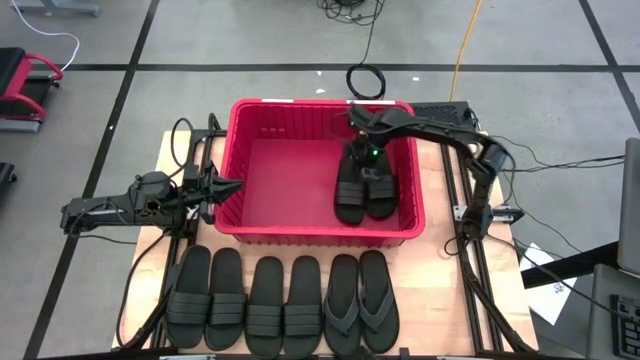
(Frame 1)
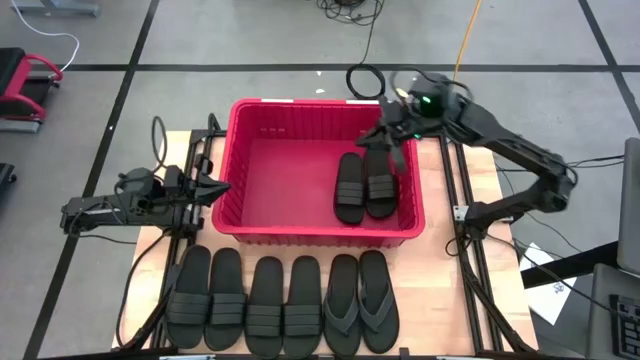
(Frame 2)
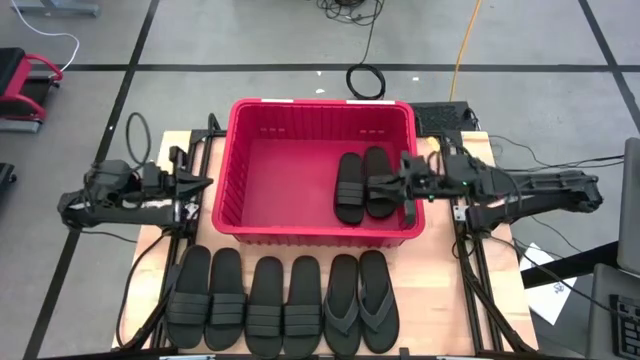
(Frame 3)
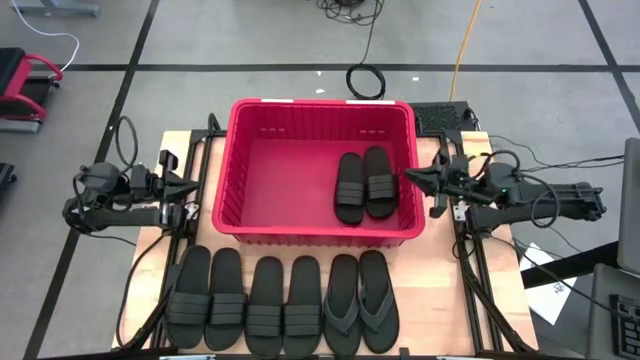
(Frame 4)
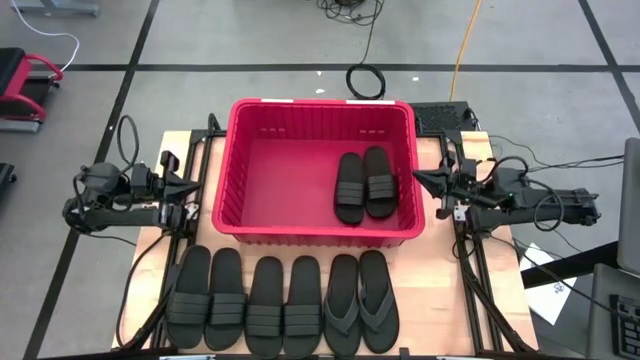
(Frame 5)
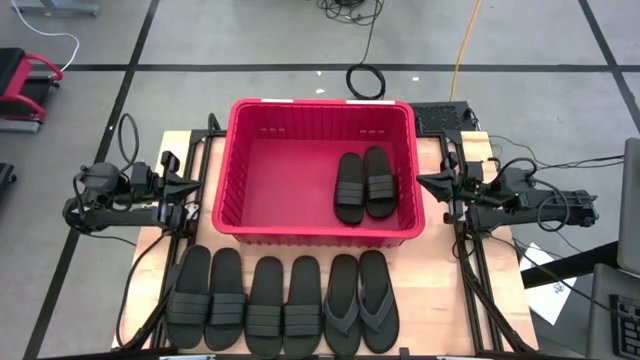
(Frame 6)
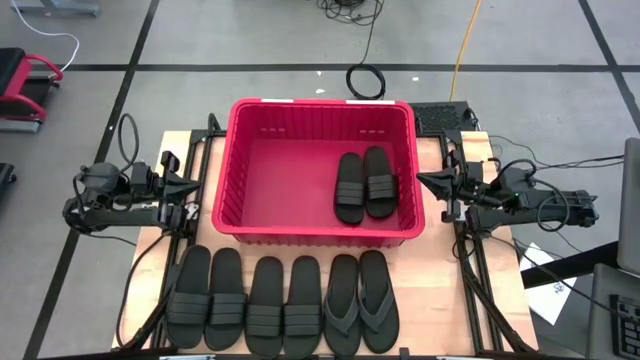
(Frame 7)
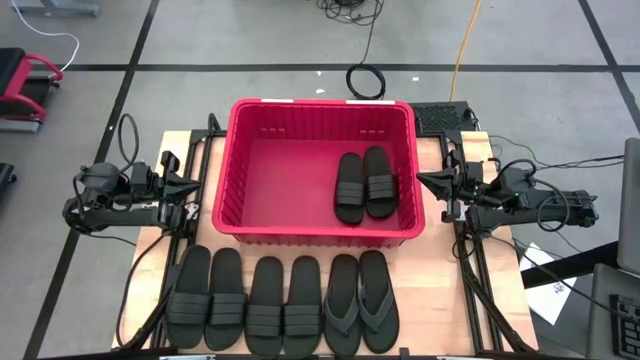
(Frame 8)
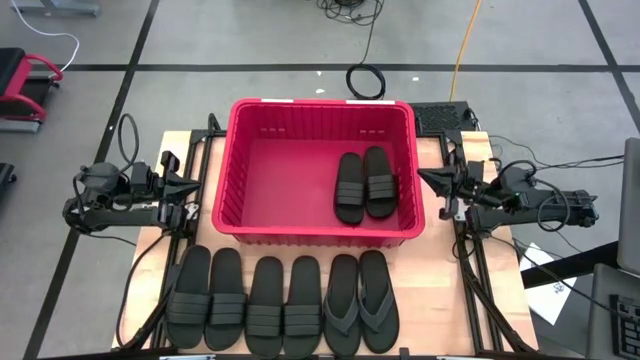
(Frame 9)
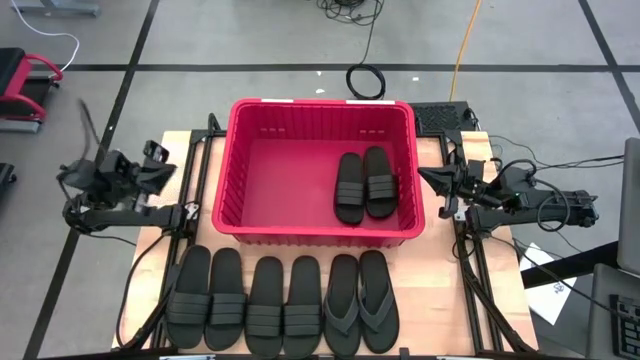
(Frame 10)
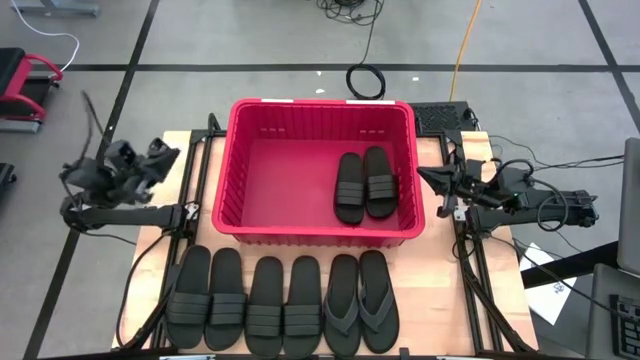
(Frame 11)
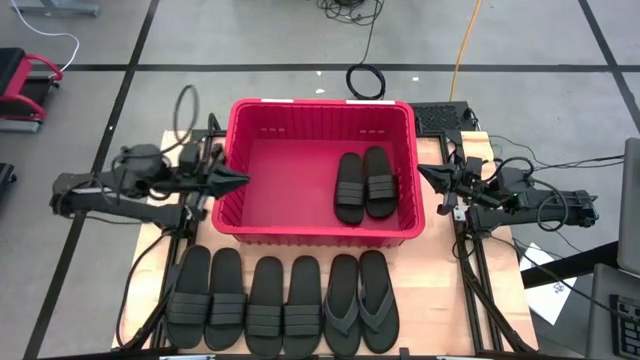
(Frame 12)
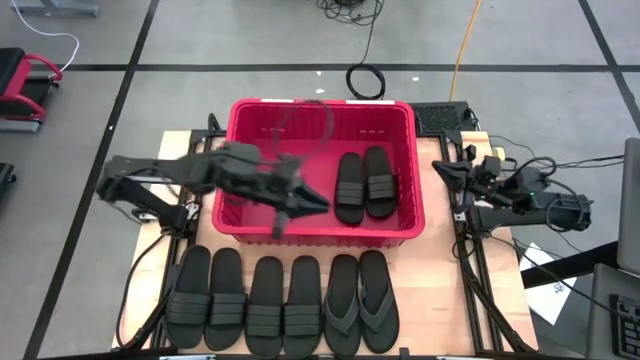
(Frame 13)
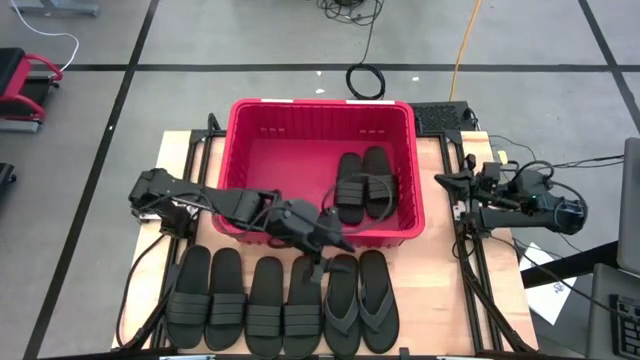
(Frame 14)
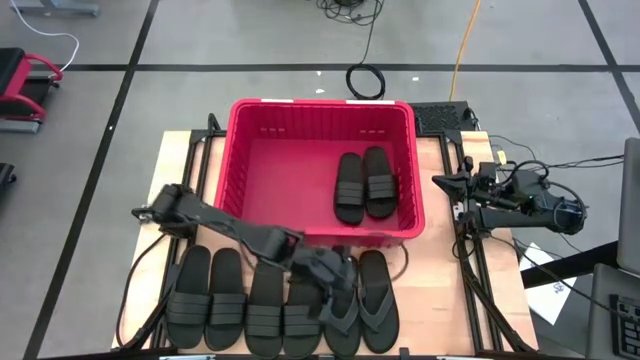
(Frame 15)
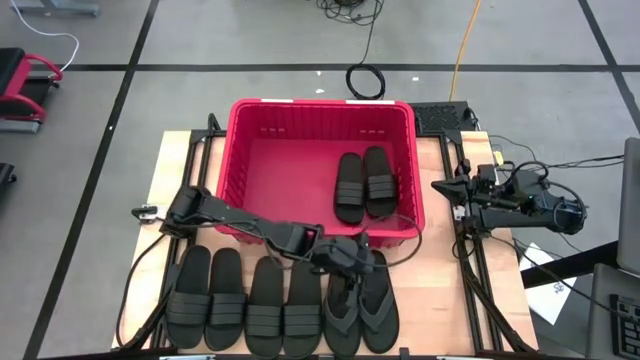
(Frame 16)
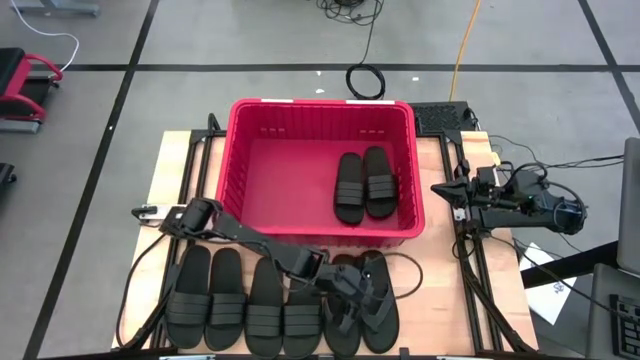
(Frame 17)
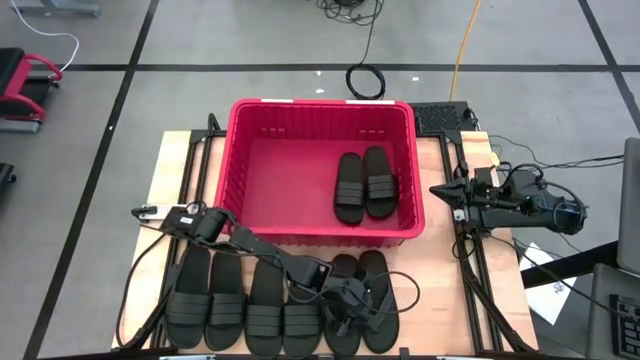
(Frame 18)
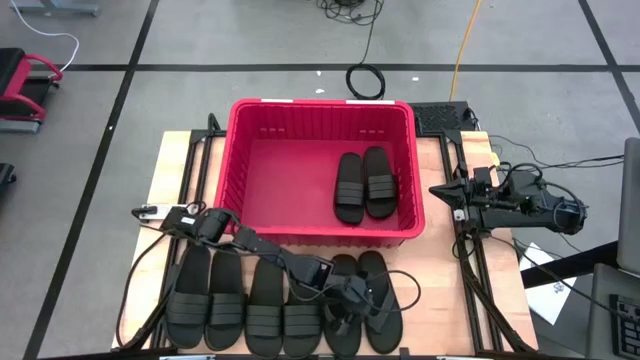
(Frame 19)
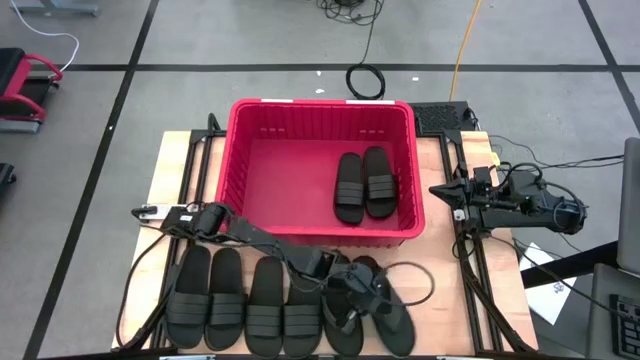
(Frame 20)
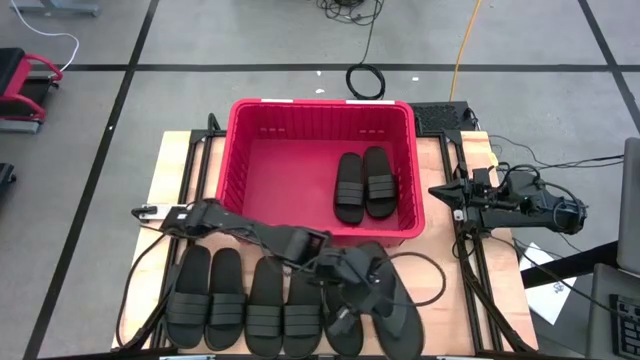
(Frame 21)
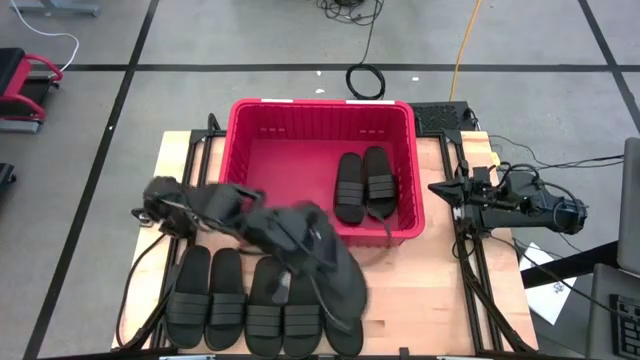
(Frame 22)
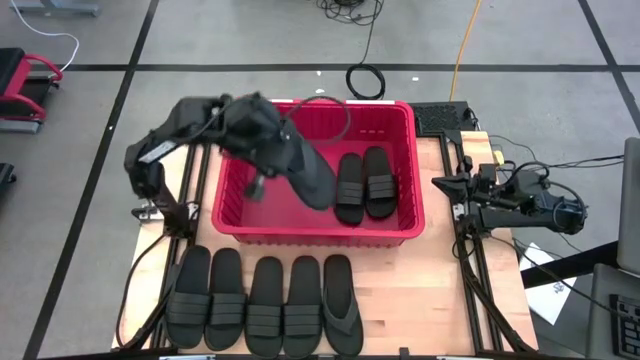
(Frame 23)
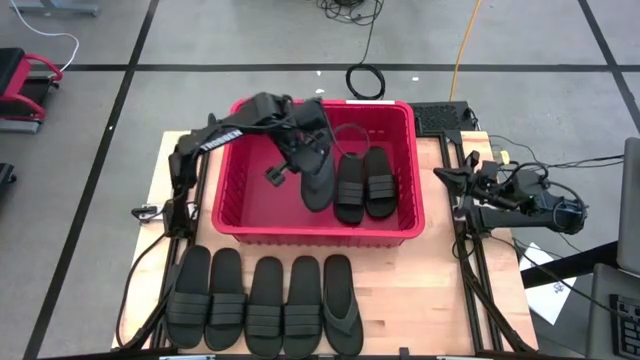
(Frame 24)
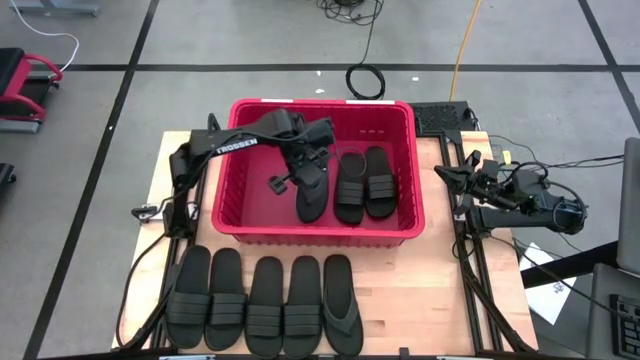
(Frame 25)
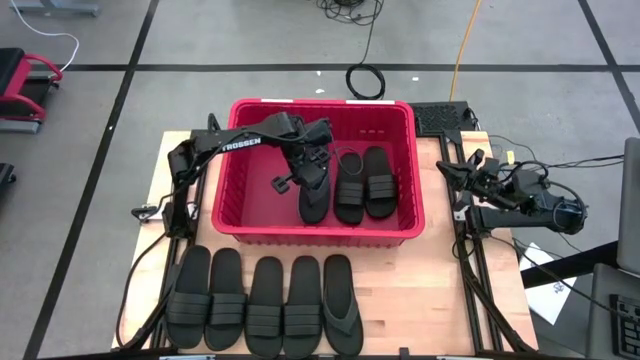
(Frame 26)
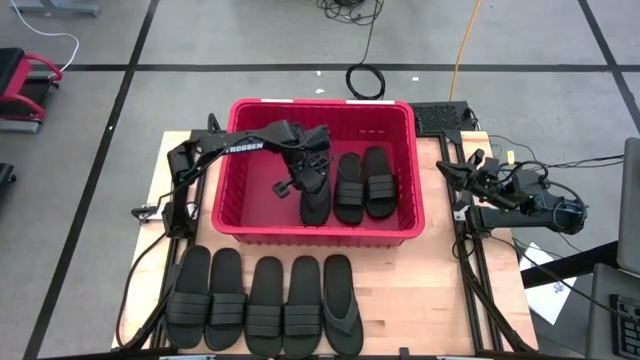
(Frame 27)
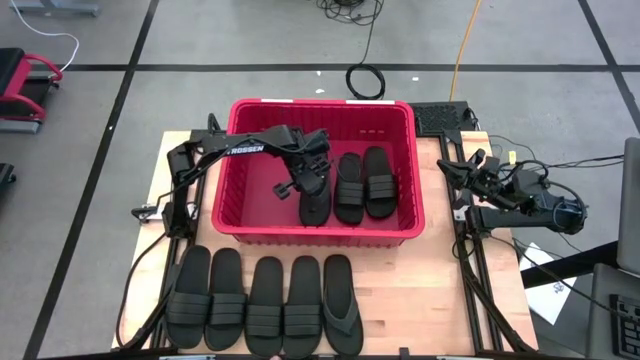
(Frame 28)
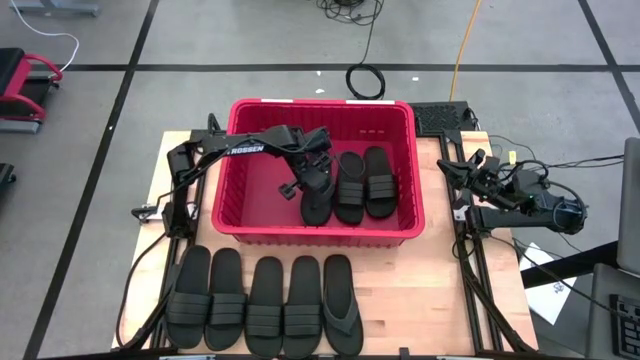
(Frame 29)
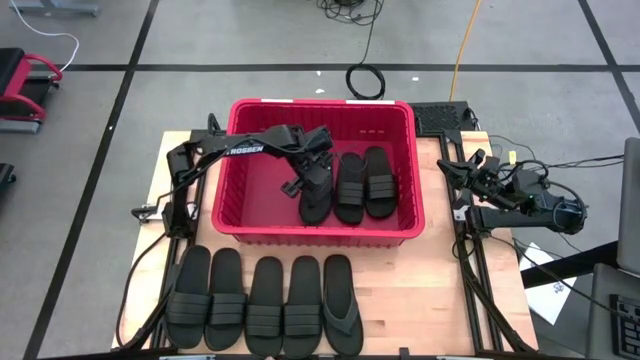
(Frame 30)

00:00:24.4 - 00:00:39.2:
Task: Pick and place slides into bin
Put the right flip flop into the bin

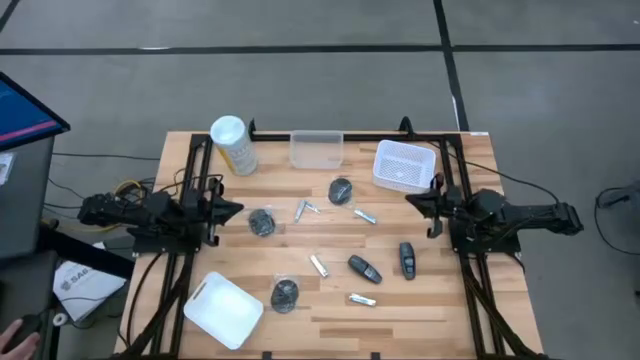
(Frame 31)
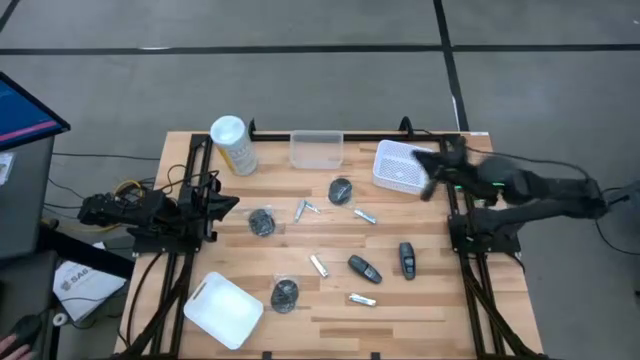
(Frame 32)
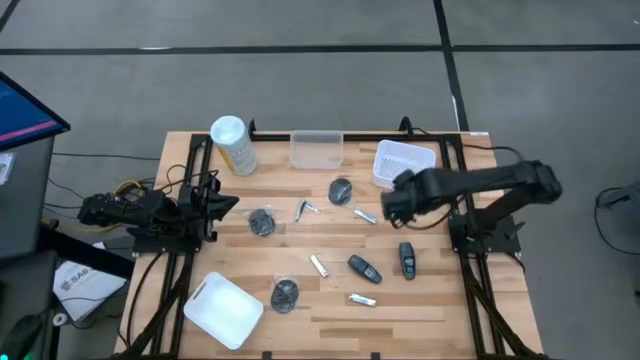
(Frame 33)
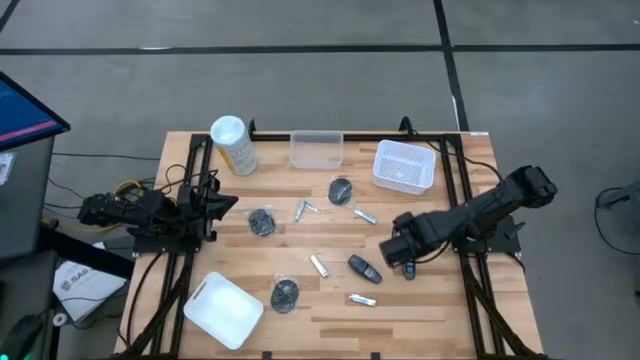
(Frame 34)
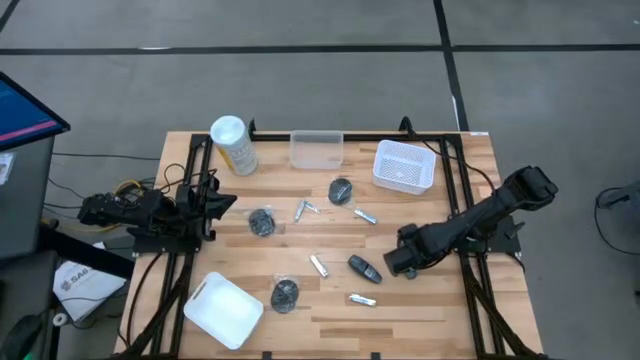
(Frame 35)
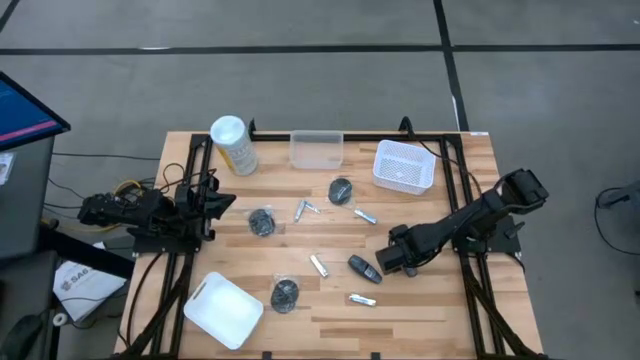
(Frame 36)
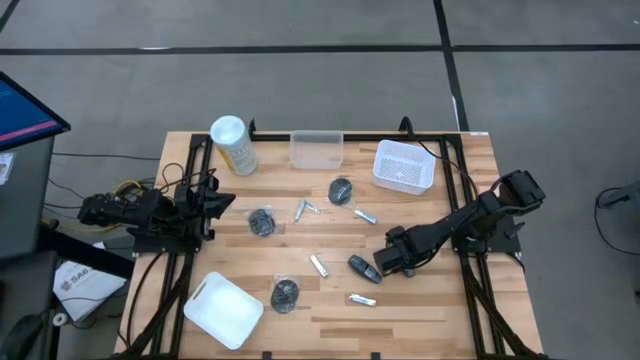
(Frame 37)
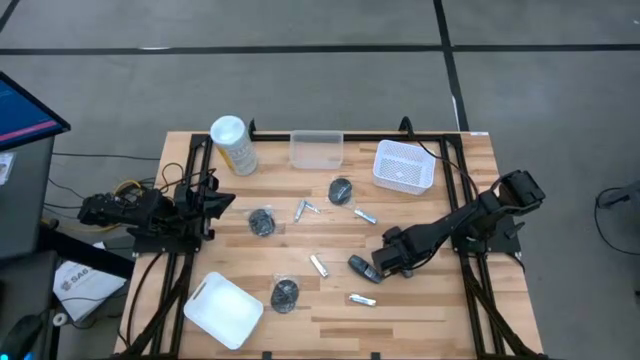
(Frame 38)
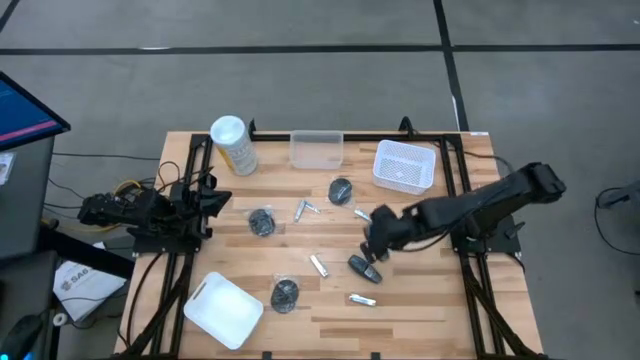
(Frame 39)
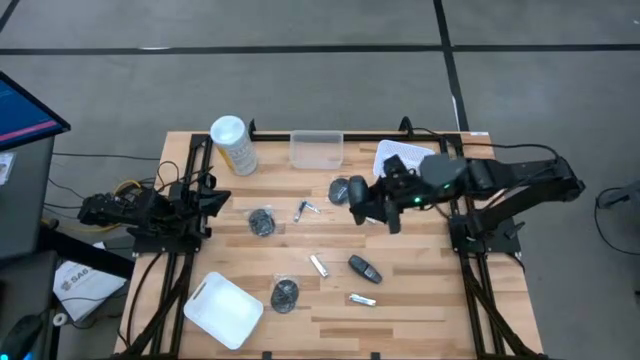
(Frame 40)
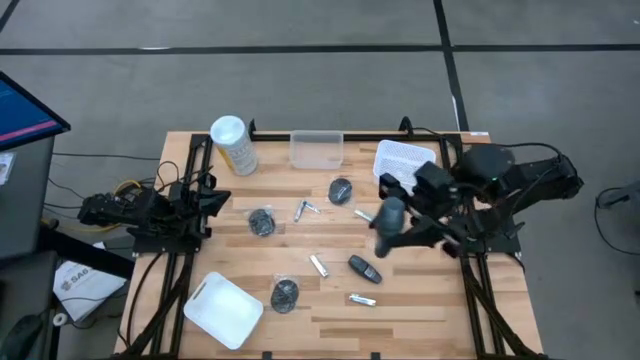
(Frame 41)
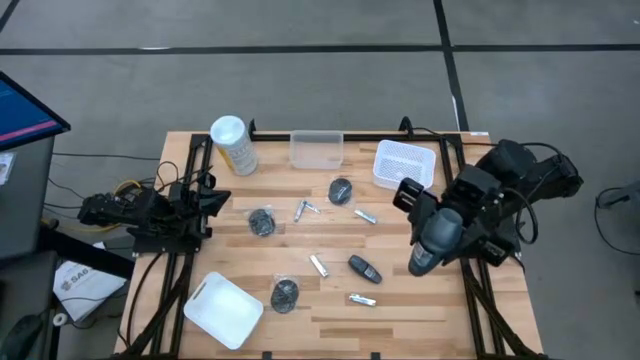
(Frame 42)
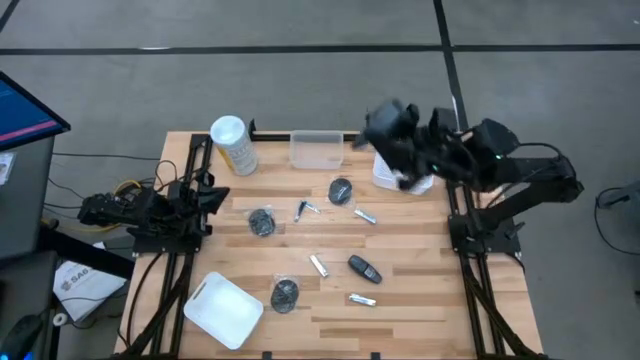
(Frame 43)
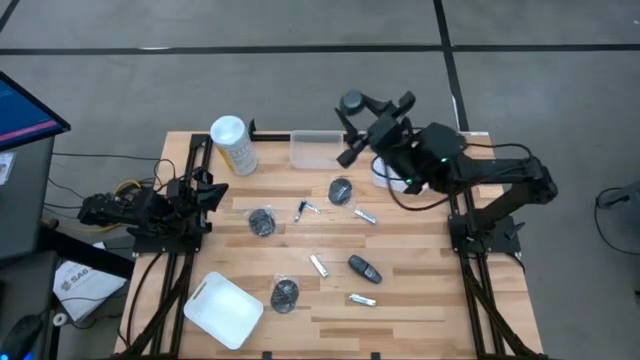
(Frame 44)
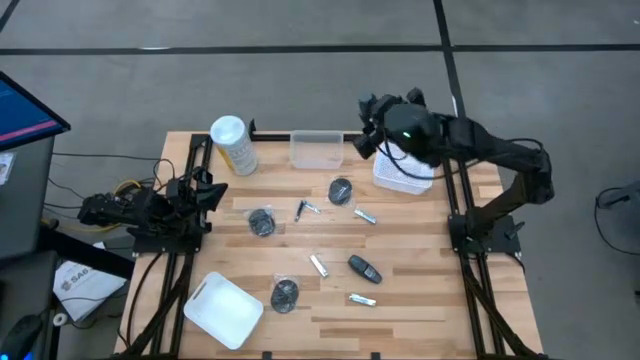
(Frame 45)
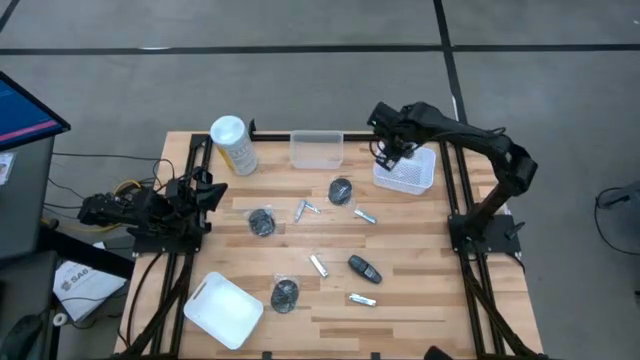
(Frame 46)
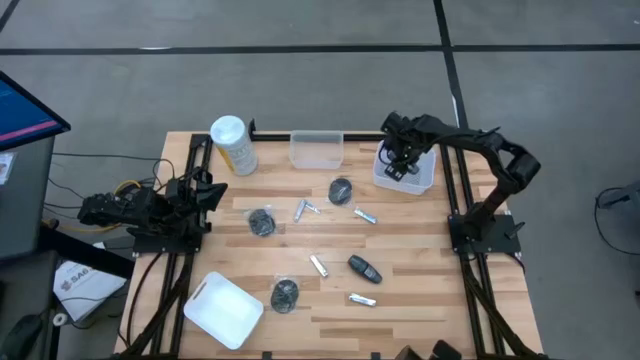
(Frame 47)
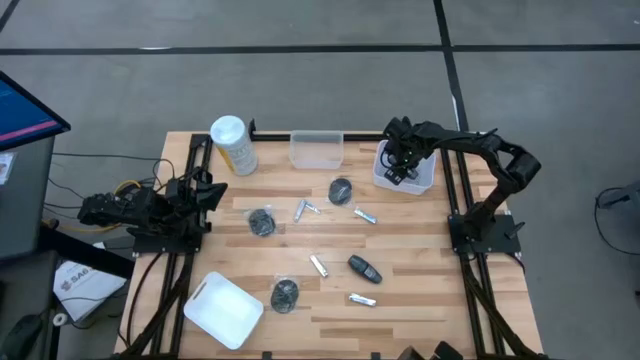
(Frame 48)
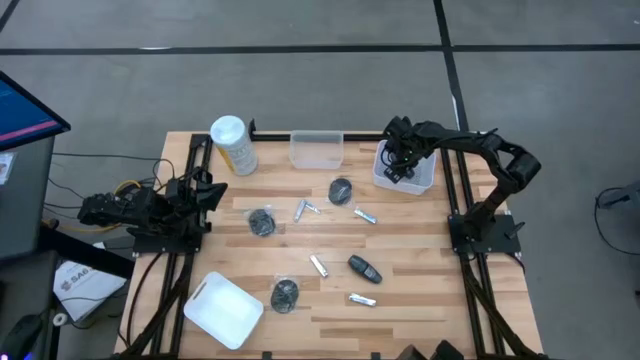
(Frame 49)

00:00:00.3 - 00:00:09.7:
Task: Pick & Place Travel size toiletries
Put the gray deodorant into the white basket
